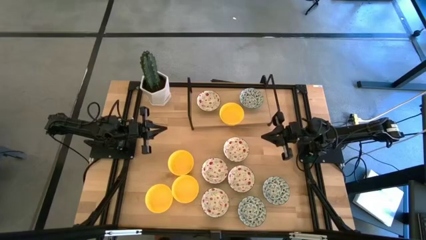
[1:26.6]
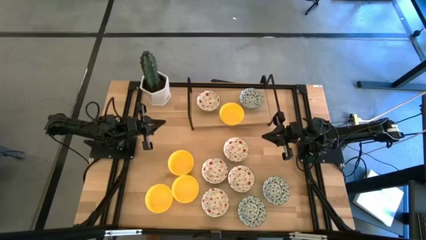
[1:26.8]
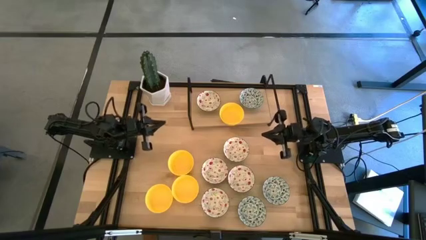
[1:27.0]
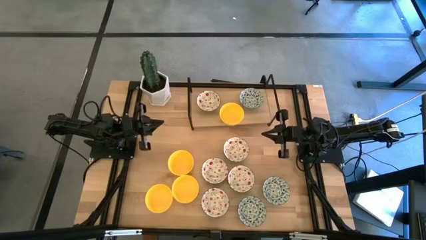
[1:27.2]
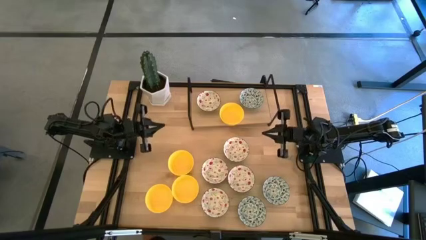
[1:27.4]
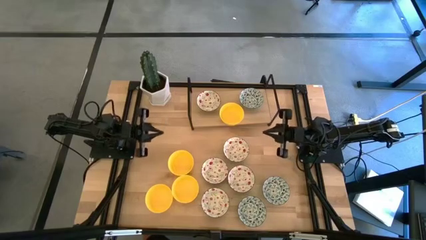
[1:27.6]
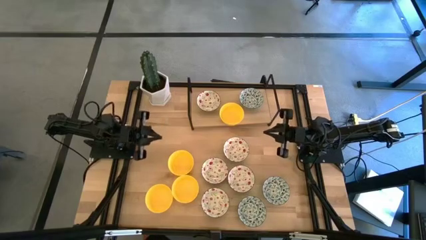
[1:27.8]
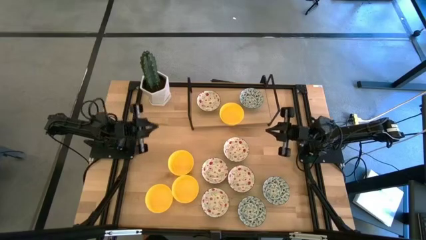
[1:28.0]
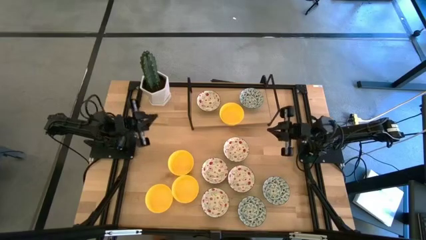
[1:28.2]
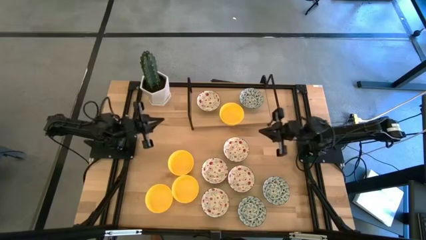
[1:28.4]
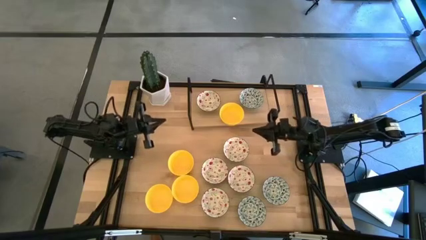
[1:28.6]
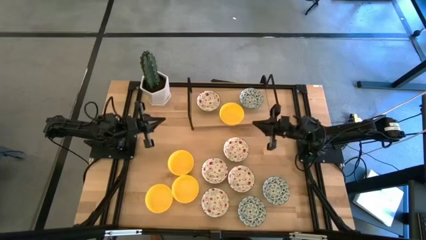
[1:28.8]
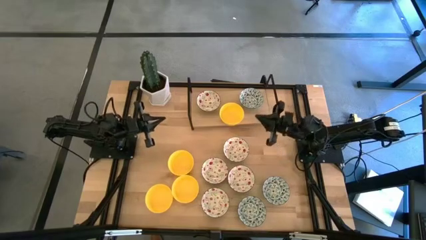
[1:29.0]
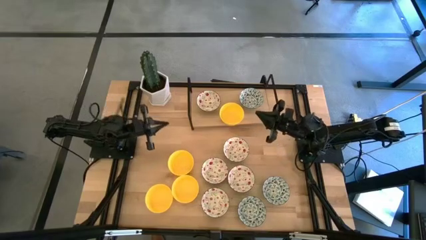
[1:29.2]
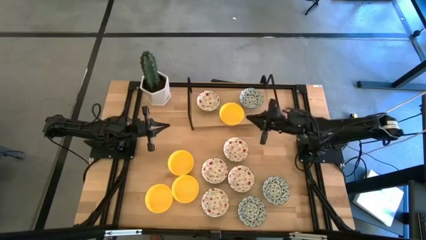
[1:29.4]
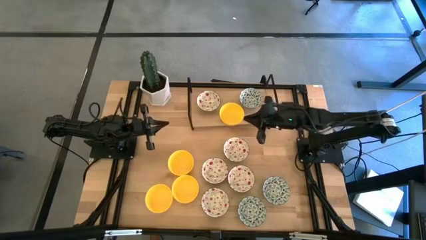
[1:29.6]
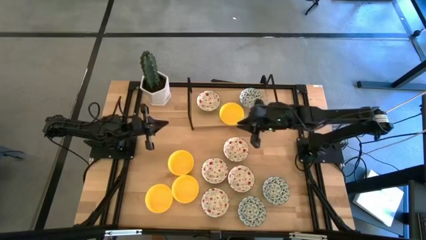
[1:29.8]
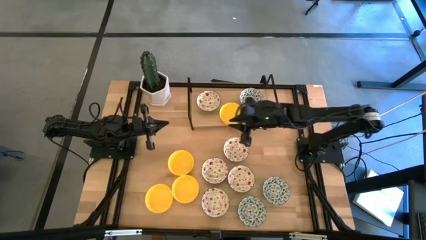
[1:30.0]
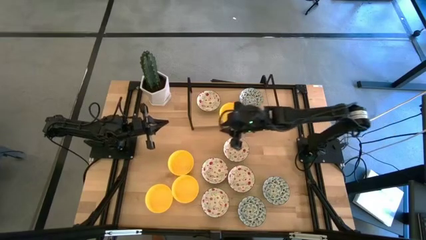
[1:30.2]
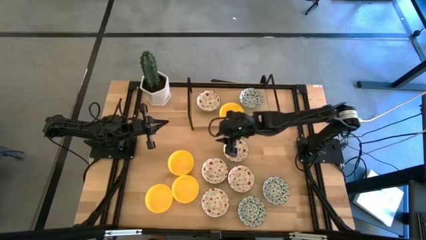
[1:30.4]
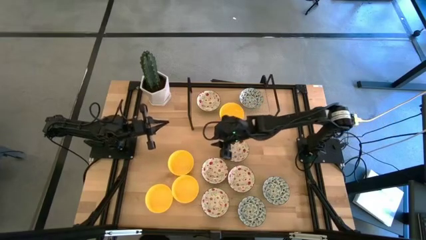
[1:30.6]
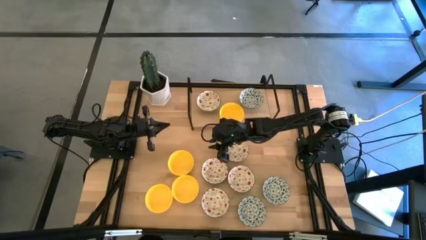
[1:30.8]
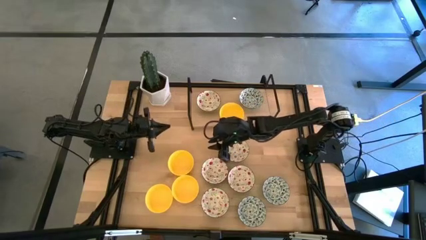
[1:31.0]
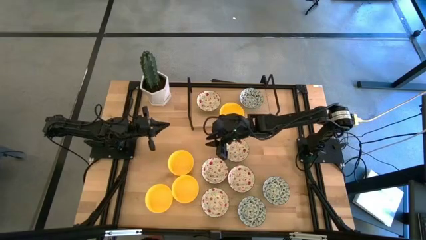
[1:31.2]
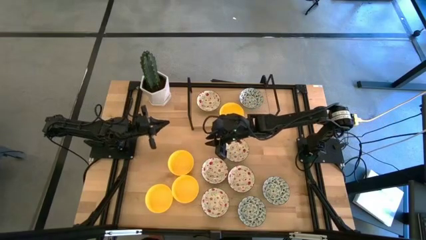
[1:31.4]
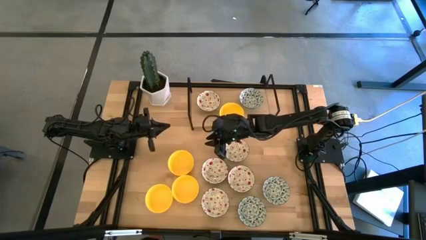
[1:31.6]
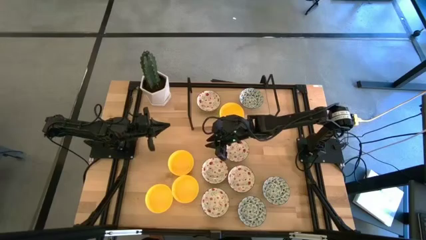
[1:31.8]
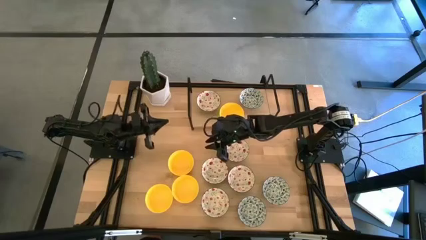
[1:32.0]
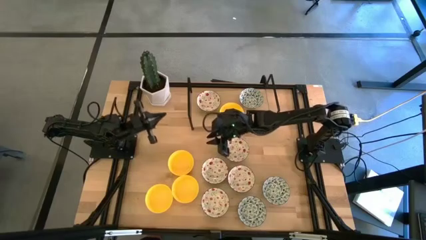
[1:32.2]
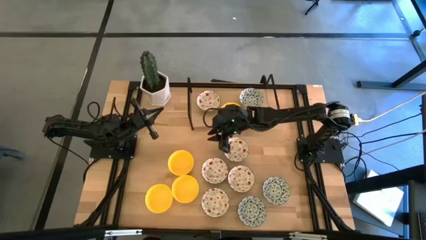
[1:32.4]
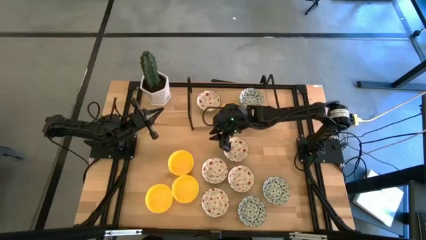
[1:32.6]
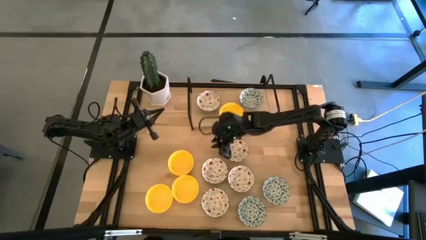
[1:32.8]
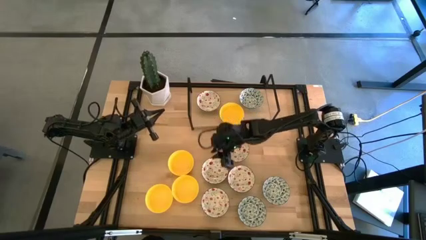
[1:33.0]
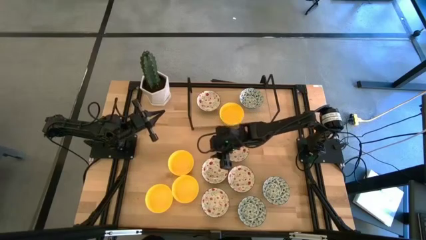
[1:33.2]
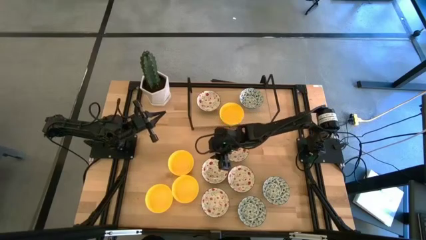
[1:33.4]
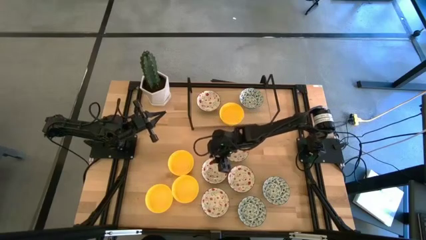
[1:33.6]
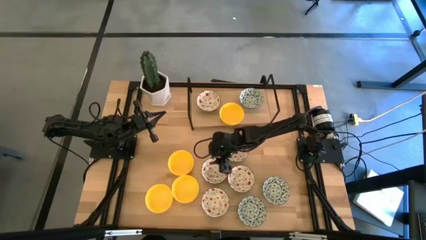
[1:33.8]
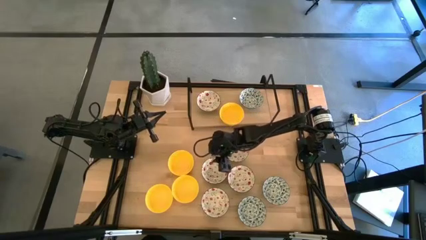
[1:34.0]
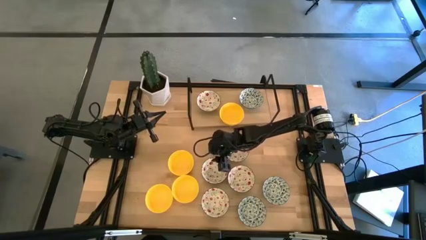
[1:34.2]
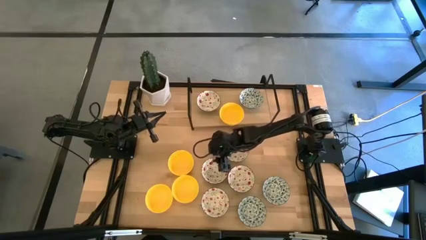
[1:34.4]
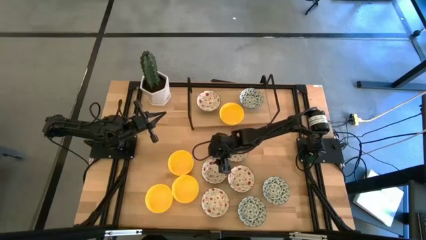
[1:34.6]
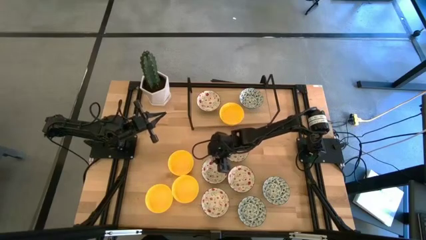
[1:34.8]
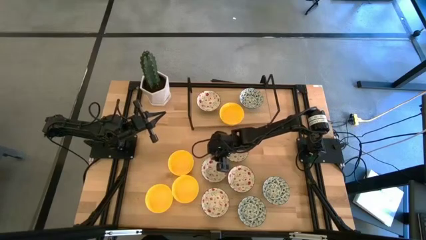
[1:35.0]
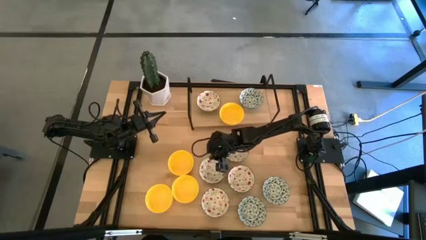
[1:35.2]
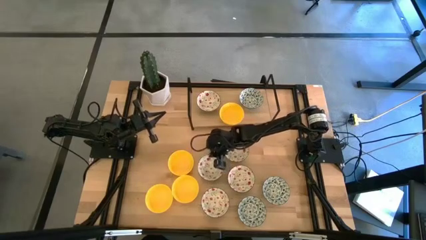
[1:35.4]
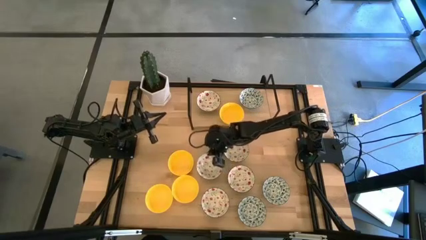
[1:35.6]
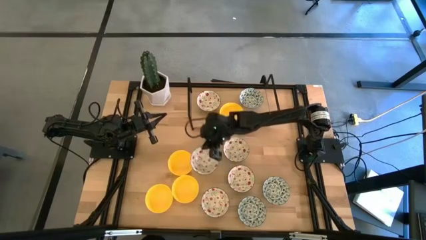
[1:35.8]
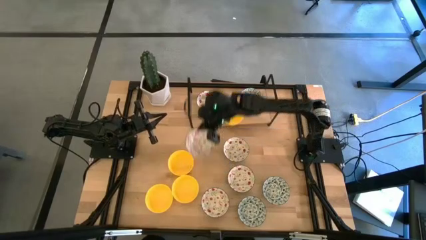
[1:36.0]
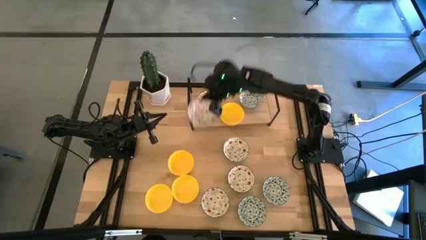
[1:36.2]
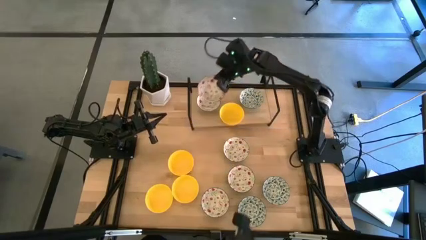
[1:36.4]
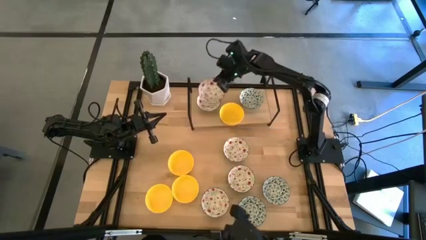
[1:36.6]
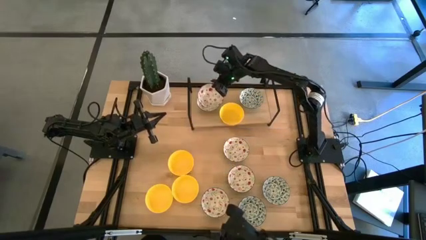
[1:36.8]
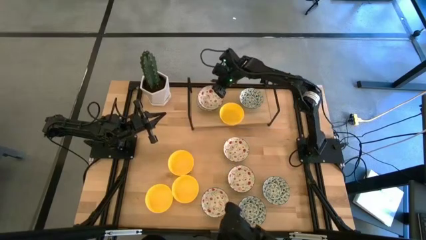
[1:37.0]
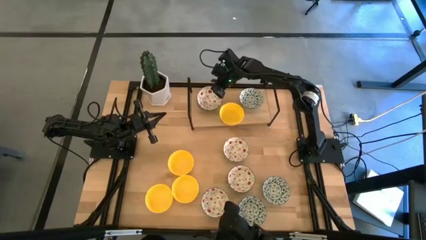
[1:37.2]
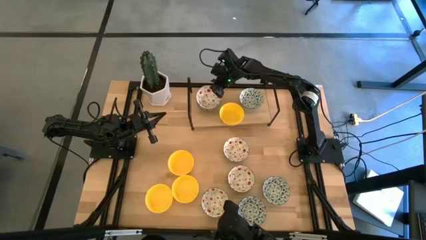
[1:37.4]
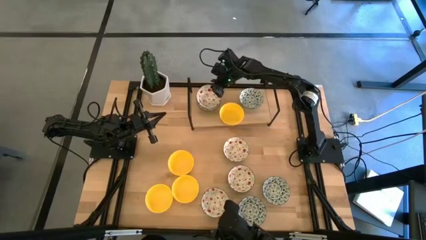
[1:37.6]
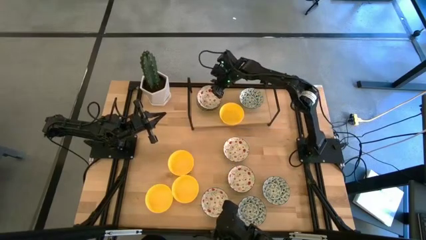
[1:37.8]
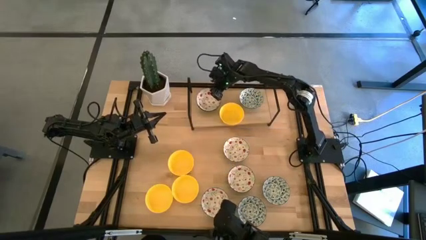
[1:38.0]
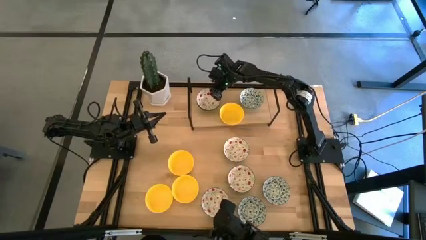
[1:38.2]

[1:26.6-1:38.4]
Task: Pick & Place Mini bowls
Stack the red patterned bowl on top of the red patterned bowl on the shelf
